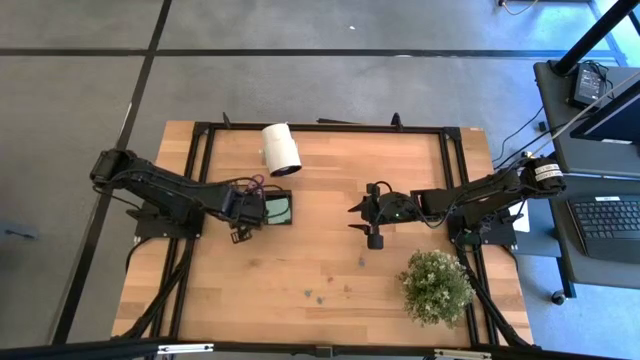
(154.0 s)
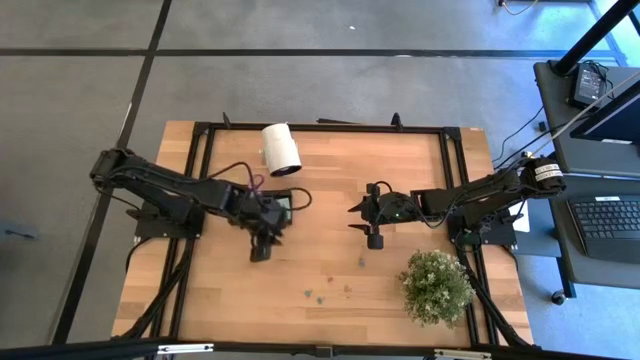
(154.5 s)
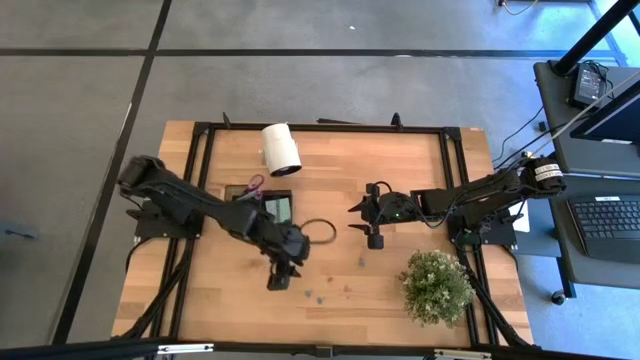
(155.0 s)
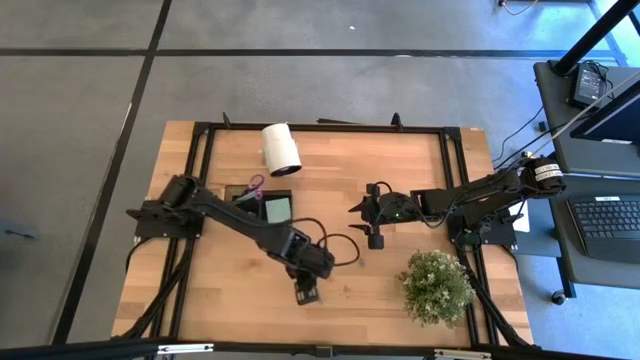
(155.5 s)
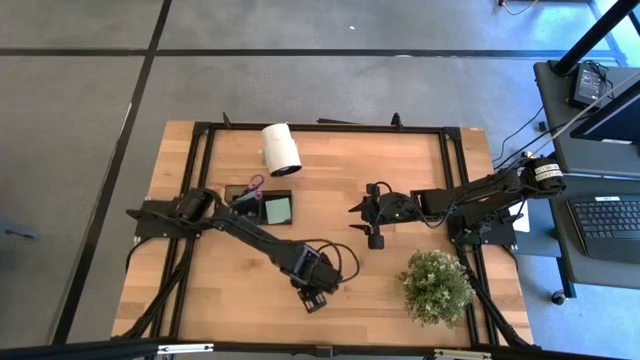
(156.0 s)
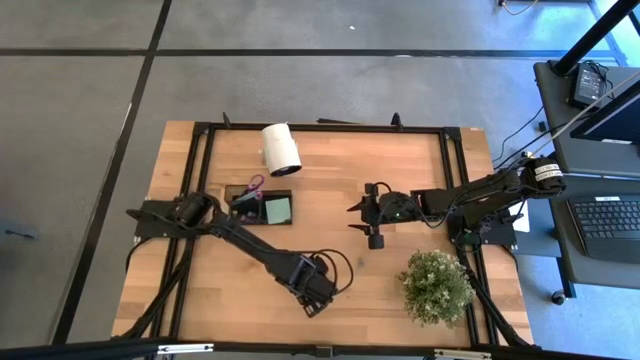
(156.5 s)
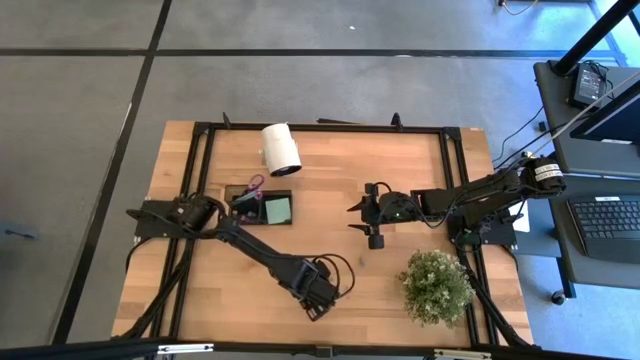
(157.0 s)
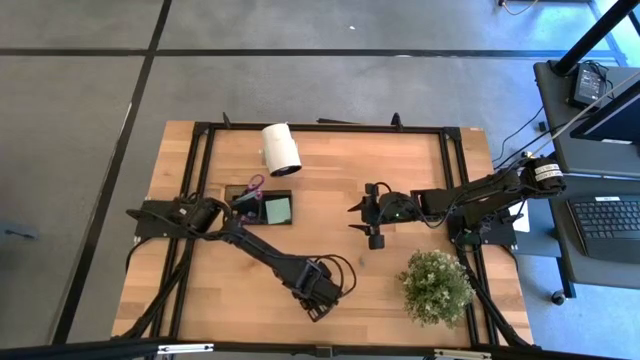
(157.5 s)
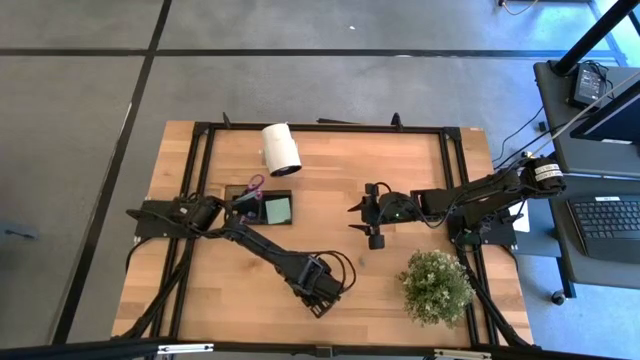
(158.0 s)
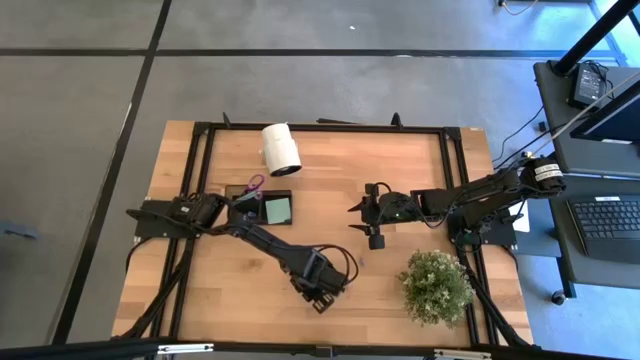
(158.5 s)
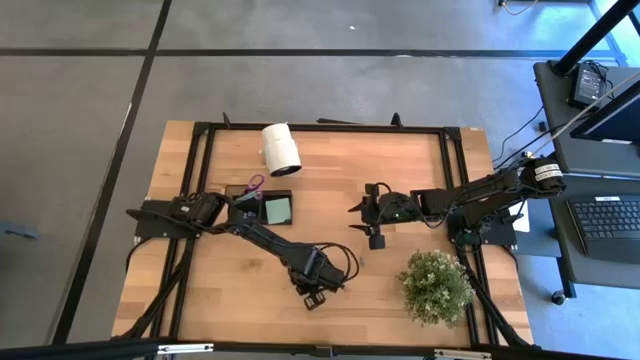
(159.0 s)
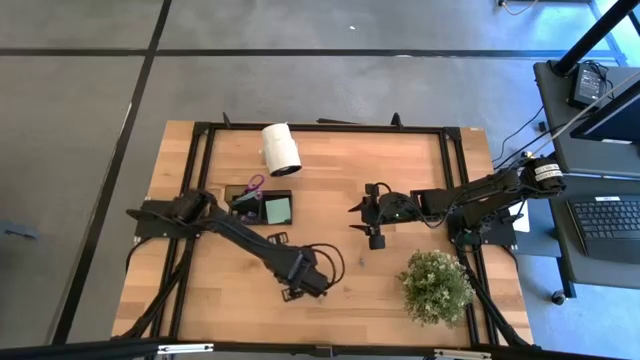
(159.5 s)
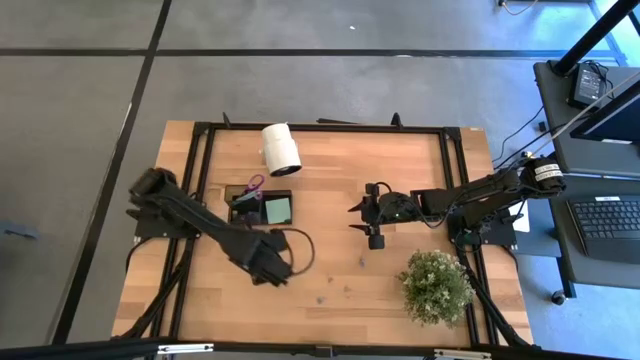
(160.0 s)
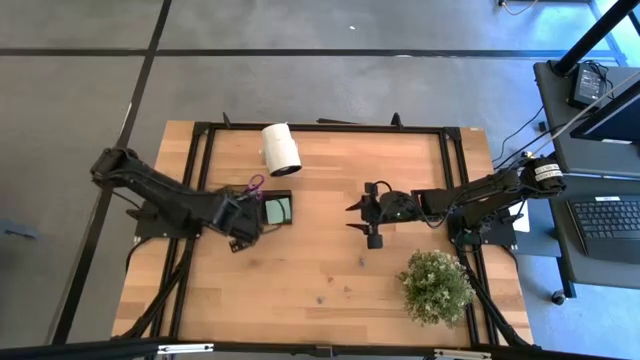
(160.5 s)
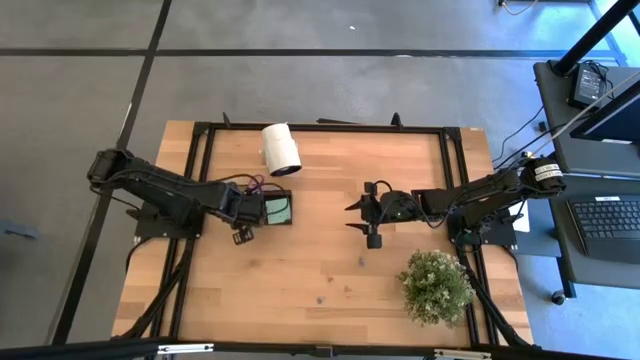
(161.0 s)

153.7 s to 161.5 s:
Task: Pick and place office supplies into organizer
Put the blue binder clip into the black desk organizer

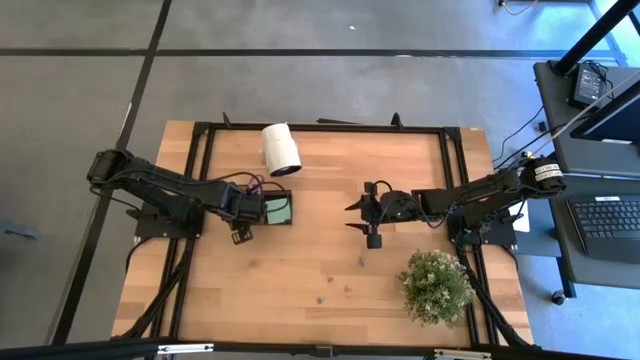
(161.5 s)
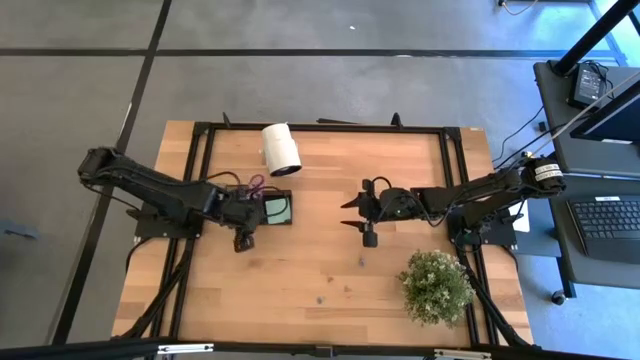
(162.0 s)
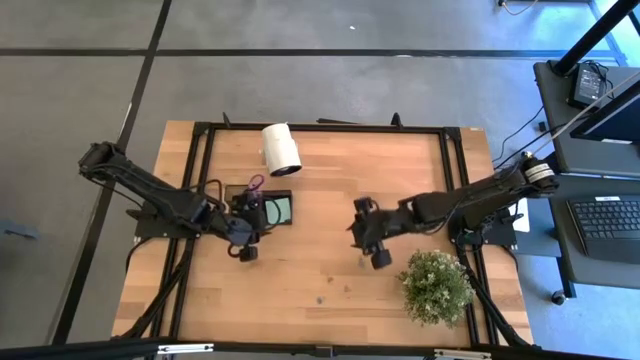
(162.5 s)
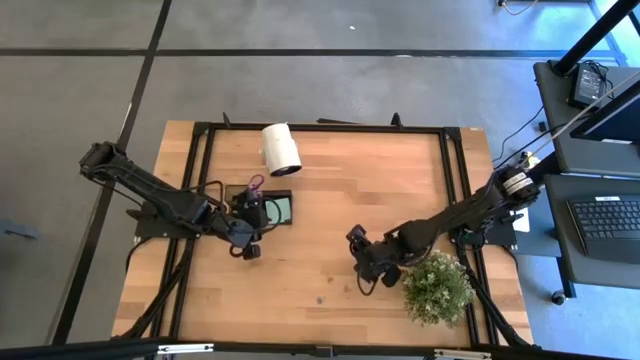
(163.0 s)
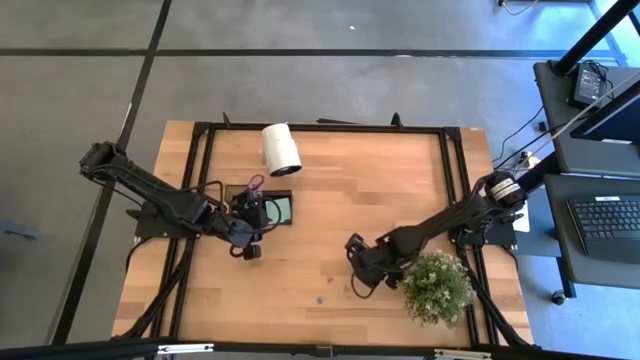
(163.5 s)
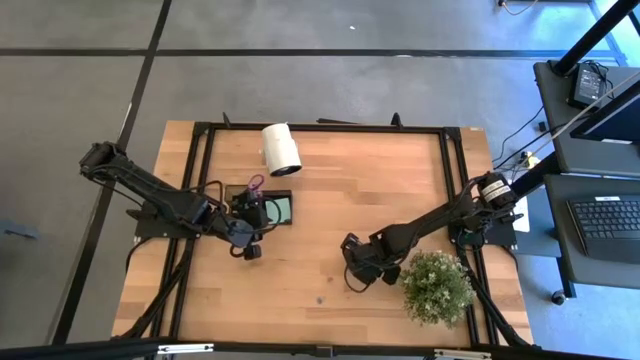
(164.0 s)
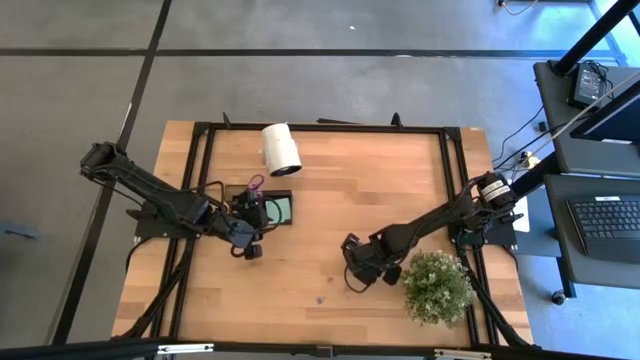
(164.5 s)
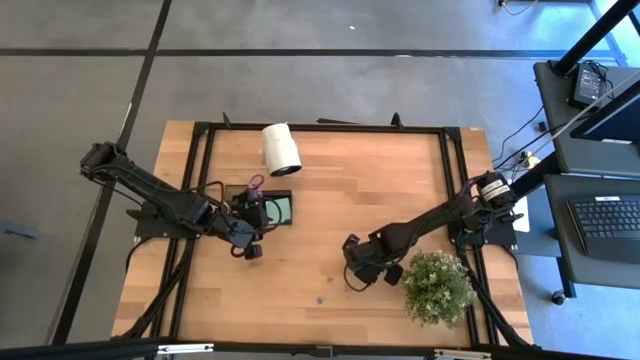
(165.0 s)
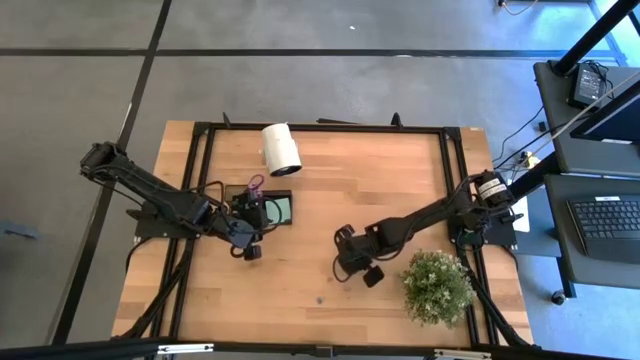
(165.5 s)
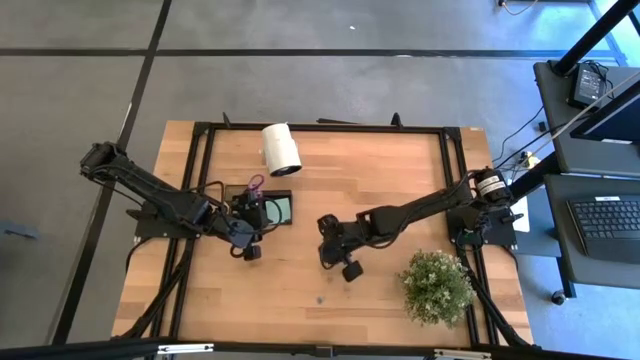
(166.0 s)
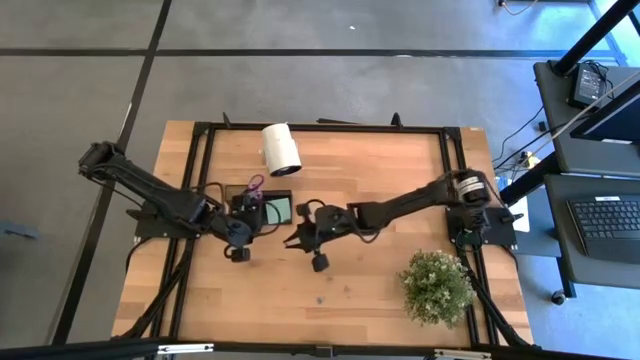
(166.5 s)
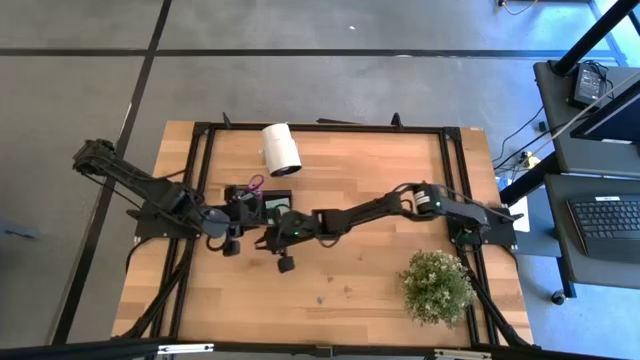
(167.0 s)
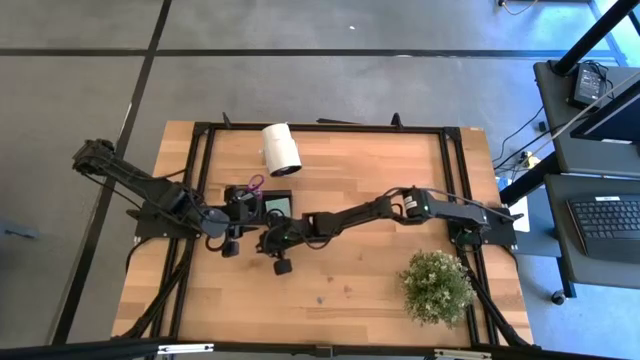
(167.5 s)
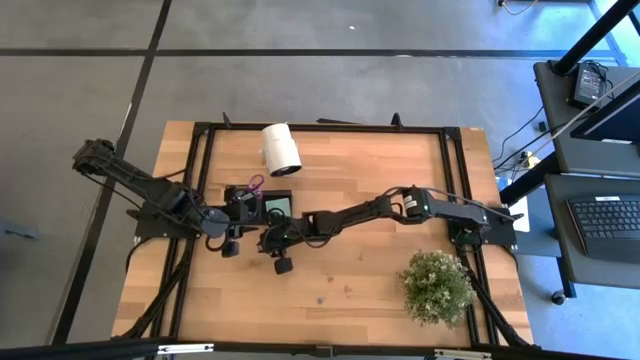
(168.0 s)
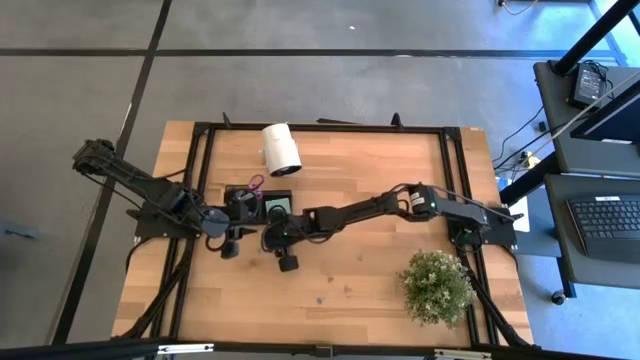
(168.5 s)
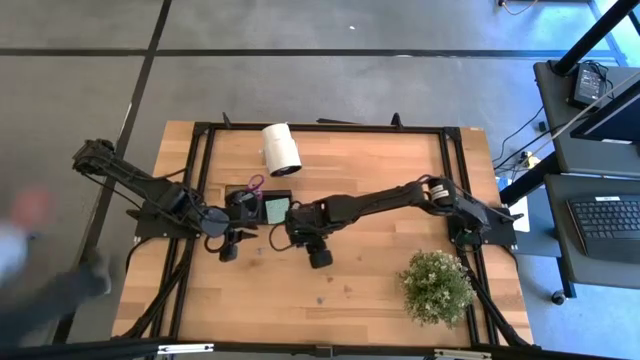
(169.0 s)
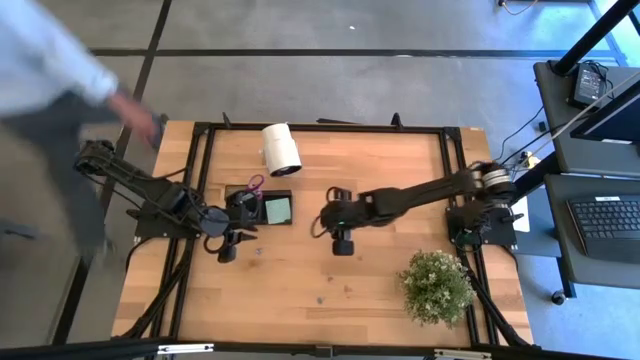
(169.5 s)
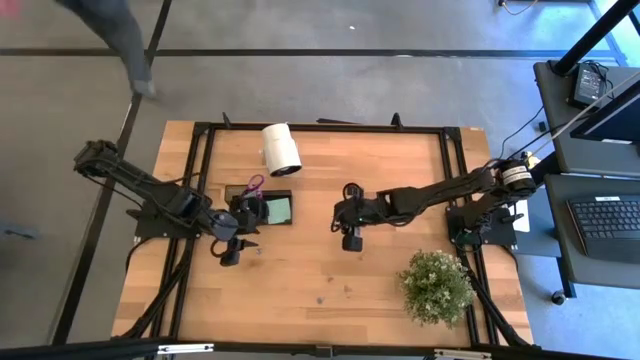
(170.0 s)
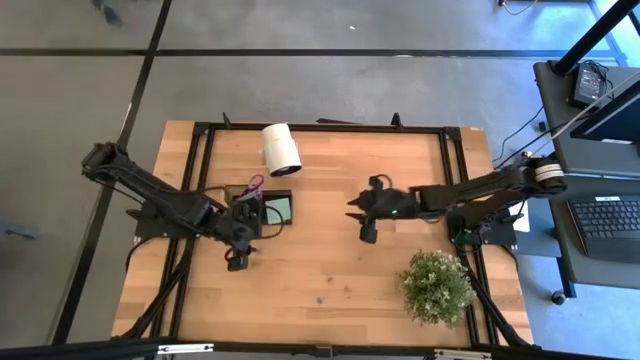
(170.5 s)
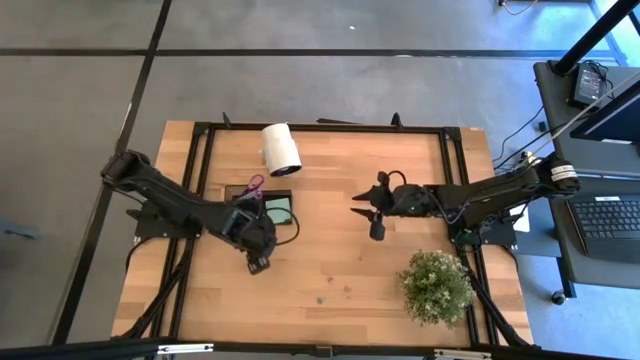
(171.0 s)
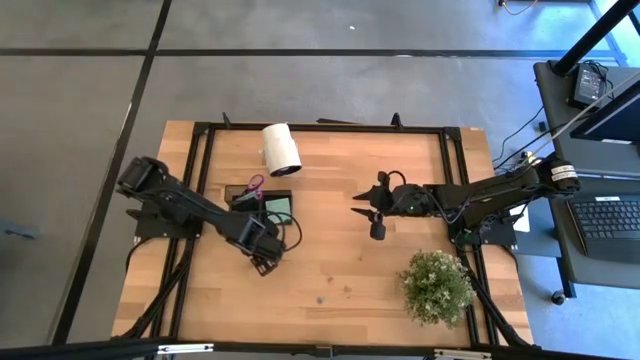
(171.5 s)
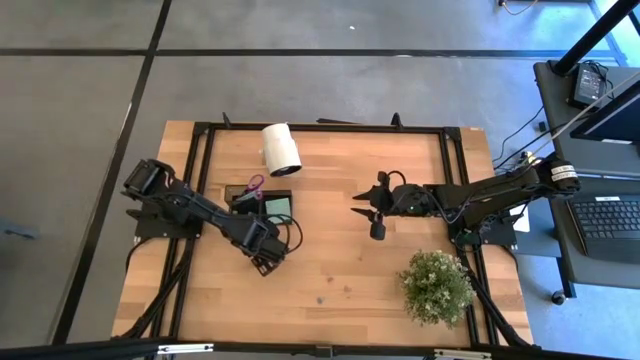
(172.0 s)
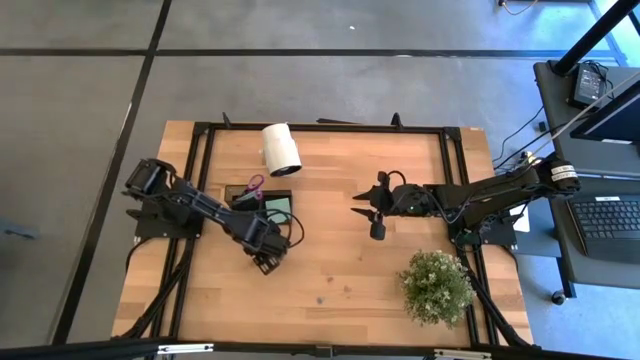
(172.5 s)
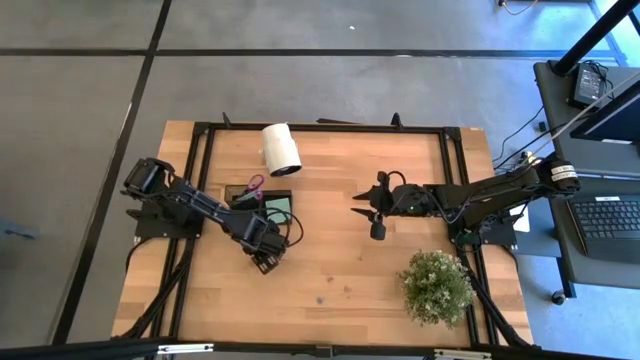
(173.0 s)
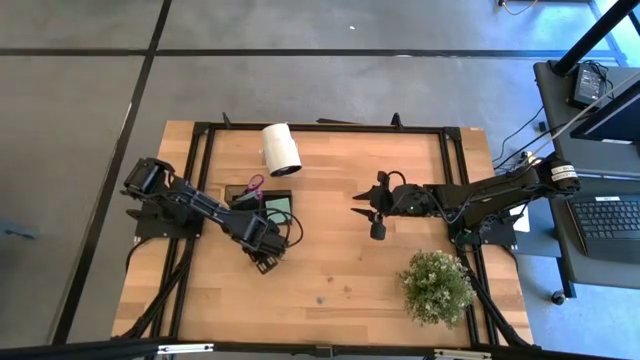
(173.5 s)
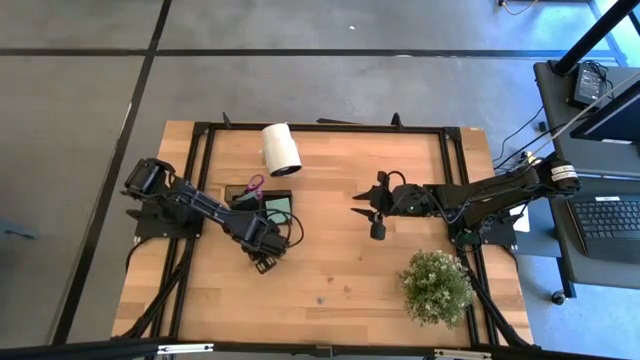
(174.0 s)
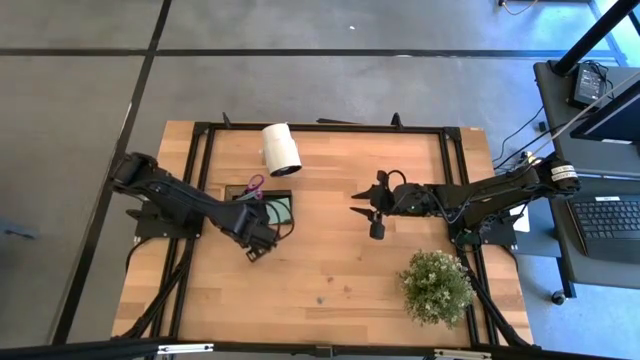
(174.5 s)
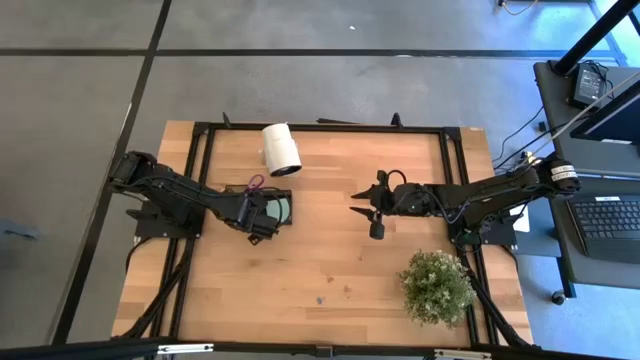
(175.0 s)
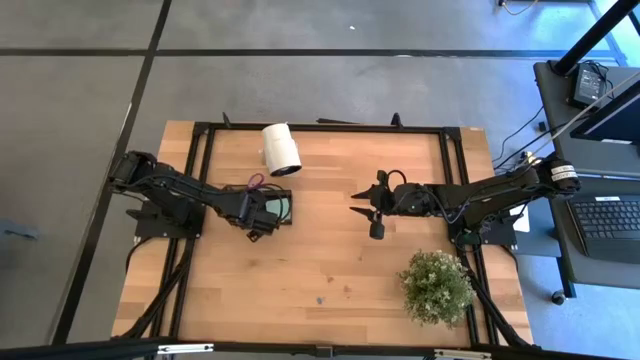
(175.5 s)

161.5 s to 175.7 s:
Put the blue binder clip into the black desk organizer
